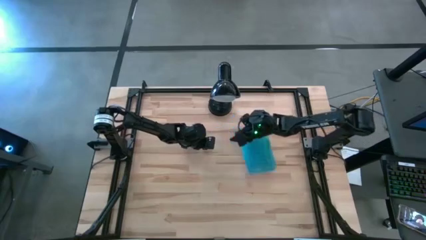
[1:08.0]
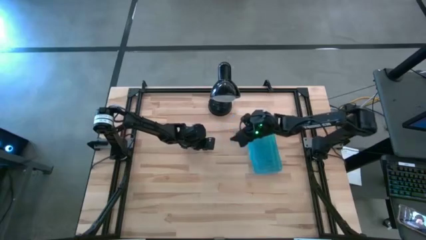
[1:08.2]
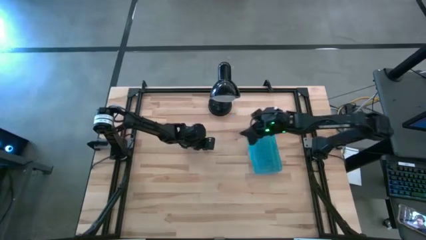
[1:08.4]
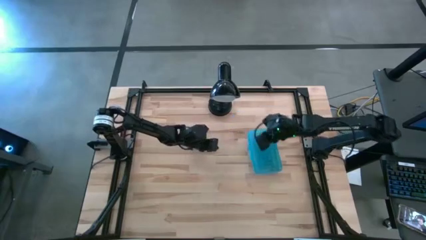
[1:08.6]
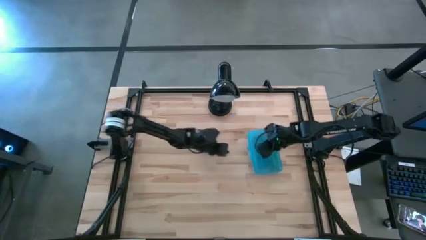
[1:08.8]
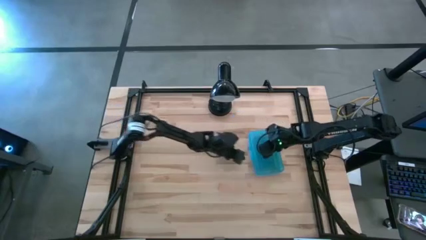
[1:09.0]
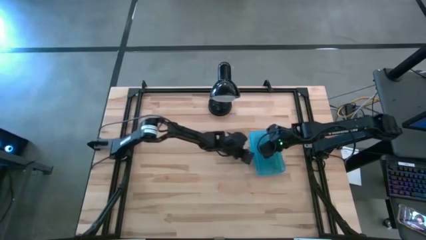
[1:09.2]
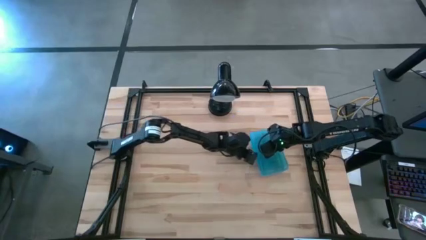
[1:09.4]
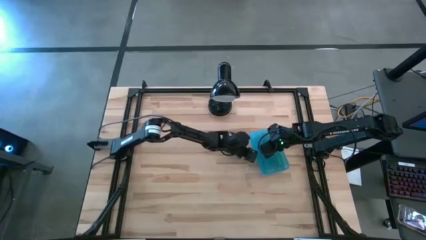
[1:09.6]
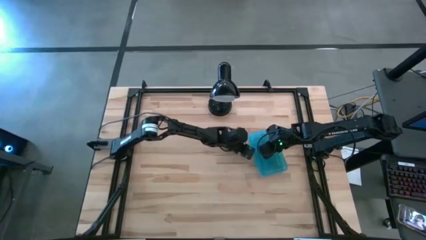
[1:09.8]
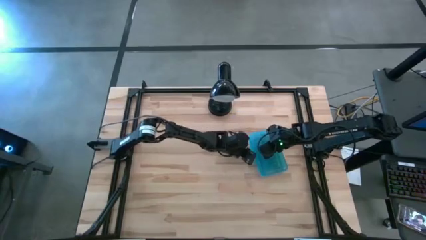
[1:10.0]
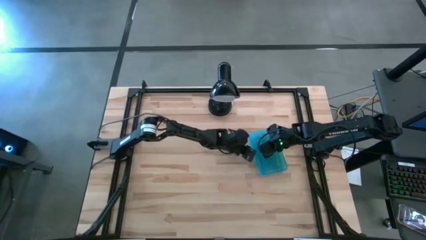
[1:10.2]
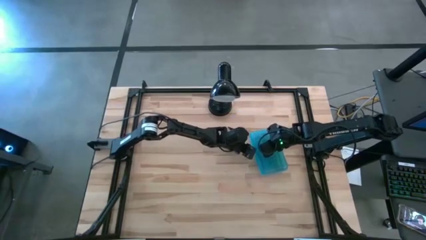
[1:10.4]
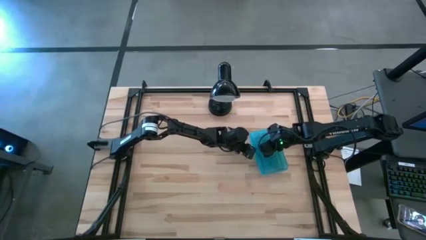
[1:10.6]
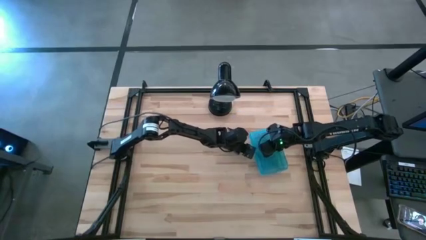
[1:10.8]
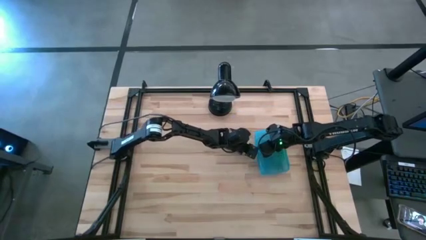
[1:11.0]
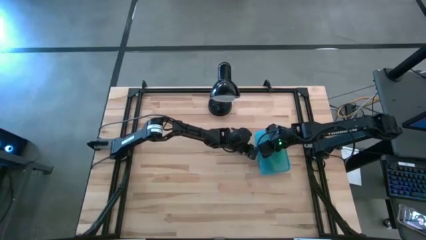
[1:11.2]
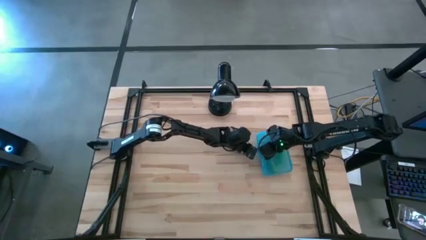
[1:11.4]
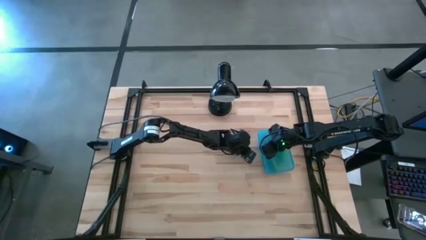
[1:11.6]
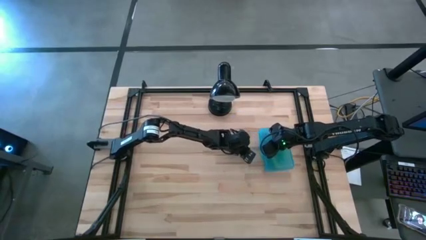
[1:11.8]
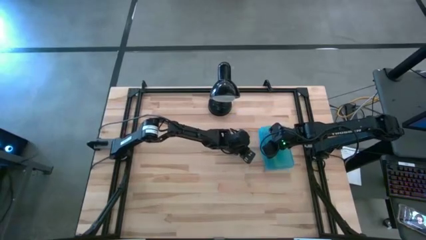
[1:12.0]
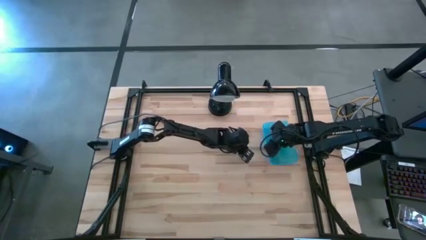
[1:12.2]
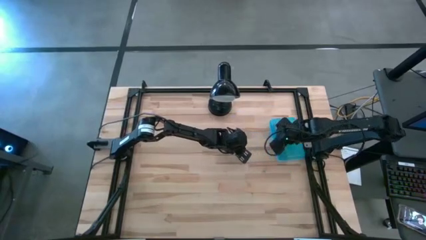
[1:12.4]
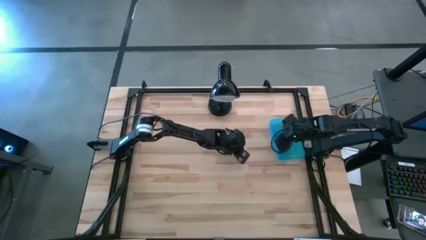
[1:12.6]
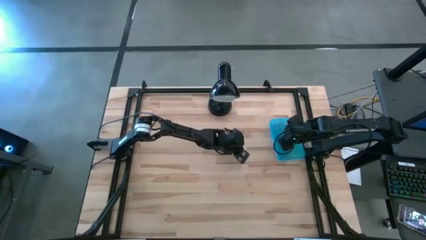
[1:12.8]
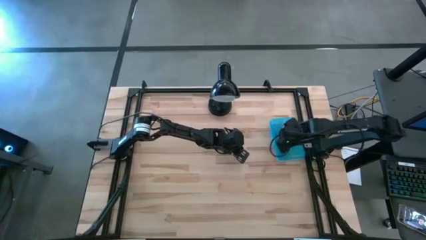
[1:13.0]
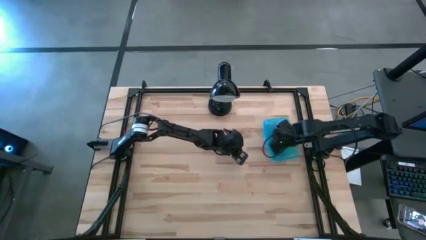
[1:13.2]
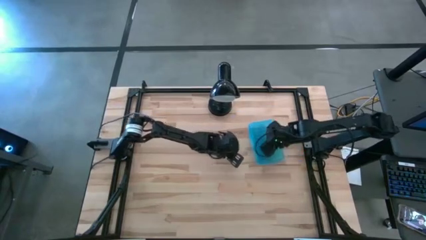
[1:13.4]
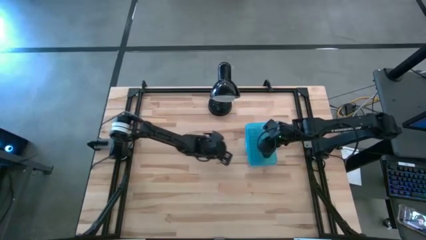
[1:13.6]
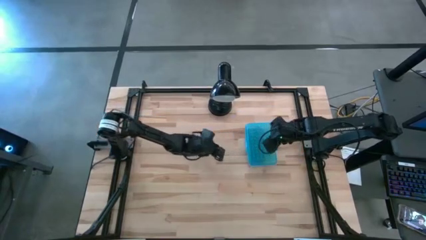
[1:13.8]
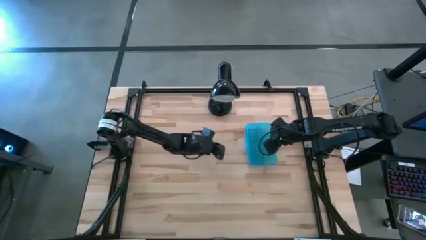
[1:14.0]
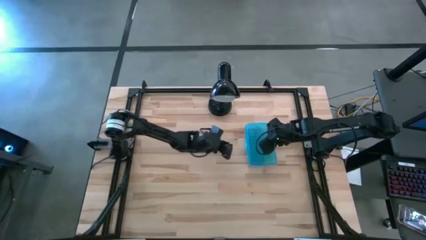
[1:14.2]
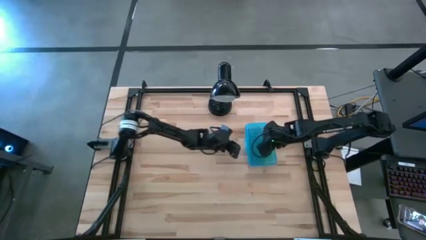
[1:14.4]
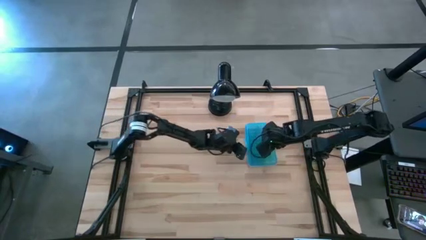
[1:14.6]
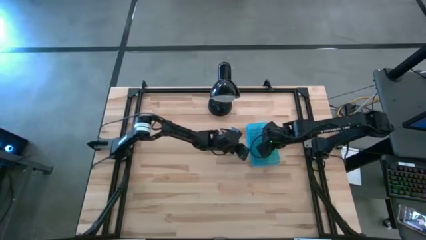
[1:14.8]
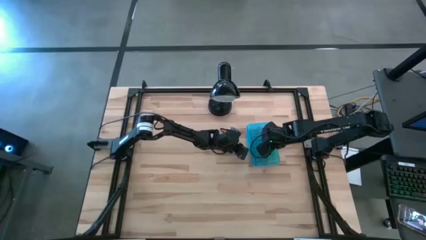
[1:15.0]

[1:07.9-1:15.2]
Task: Pick & place school supplies into a supply box
Adjust the supply box

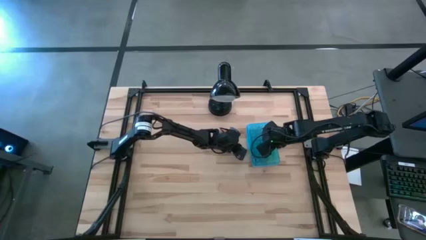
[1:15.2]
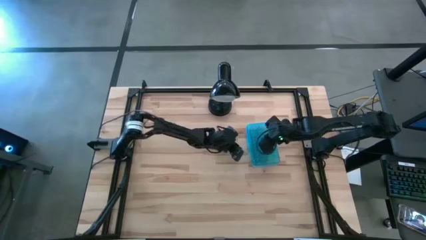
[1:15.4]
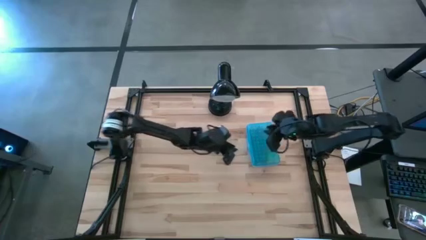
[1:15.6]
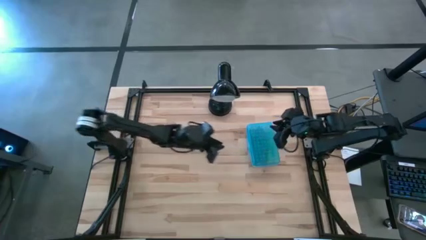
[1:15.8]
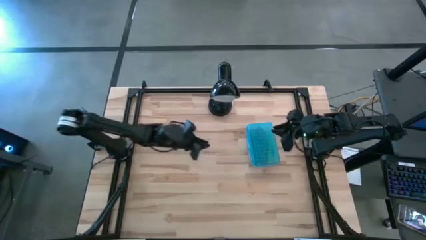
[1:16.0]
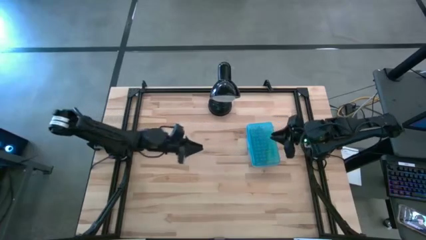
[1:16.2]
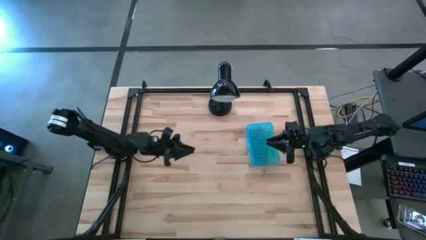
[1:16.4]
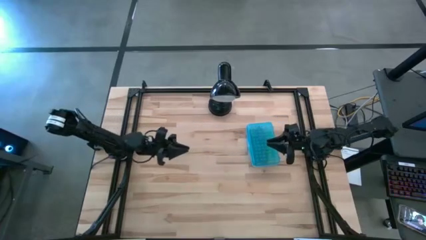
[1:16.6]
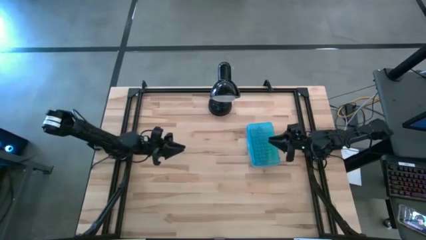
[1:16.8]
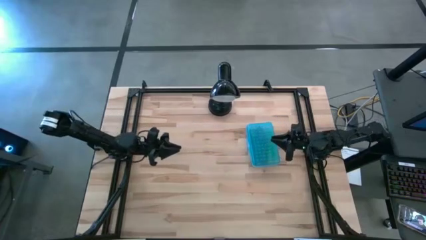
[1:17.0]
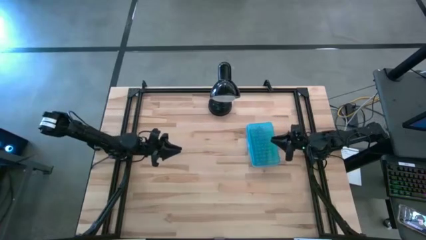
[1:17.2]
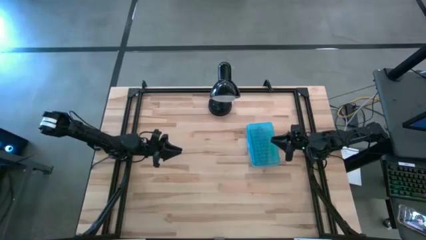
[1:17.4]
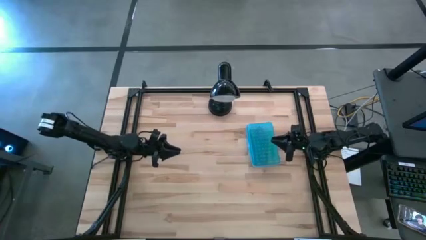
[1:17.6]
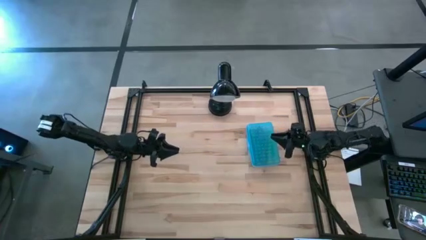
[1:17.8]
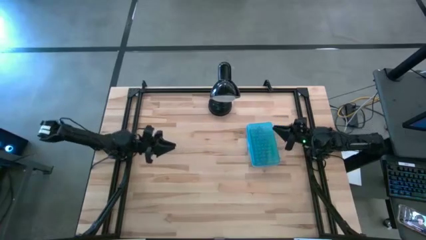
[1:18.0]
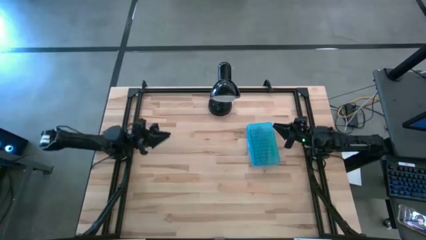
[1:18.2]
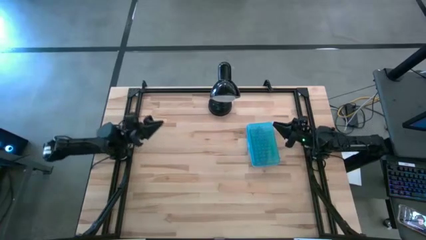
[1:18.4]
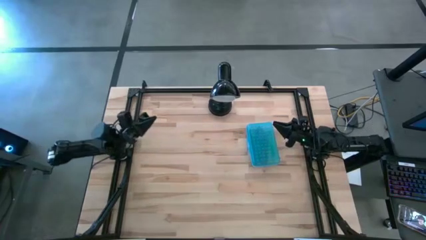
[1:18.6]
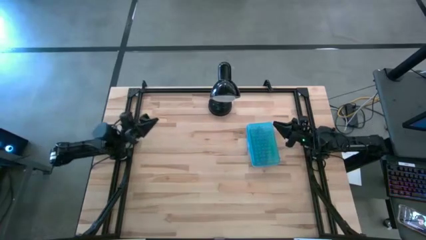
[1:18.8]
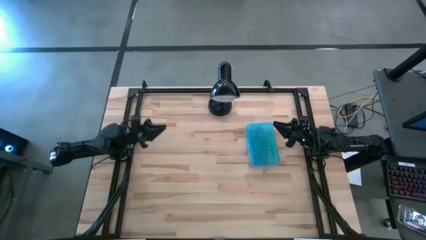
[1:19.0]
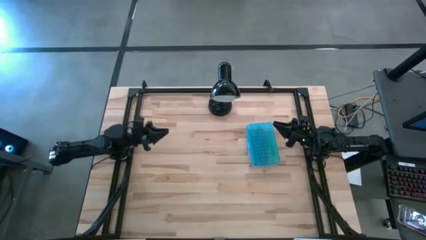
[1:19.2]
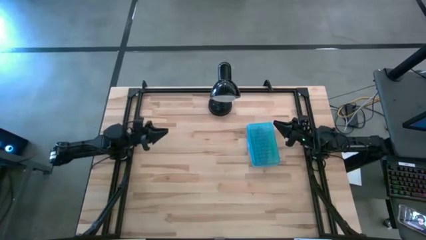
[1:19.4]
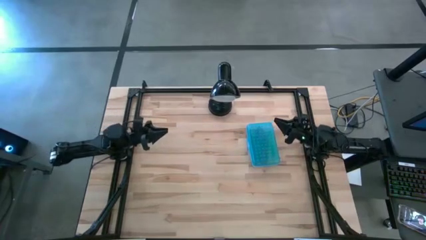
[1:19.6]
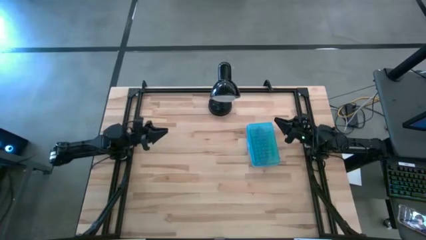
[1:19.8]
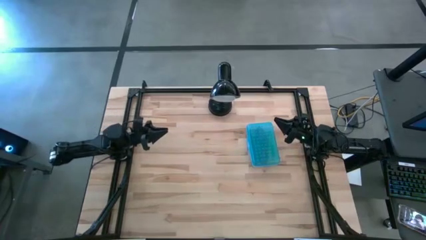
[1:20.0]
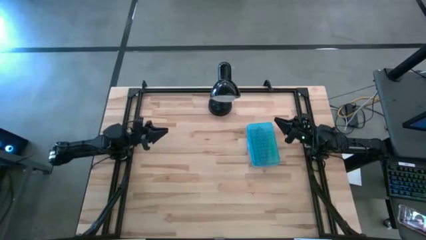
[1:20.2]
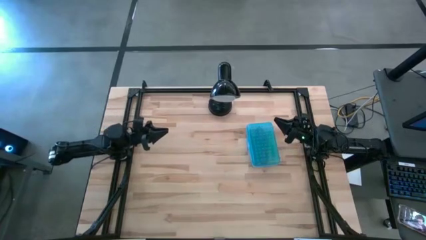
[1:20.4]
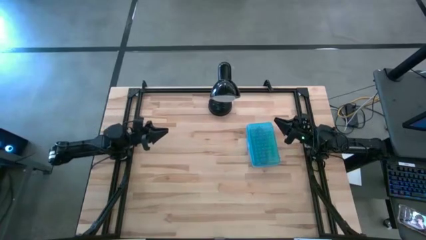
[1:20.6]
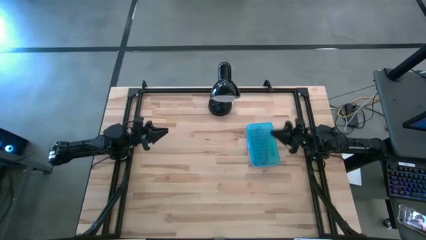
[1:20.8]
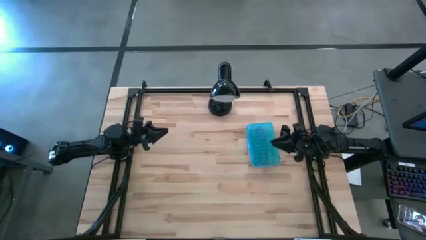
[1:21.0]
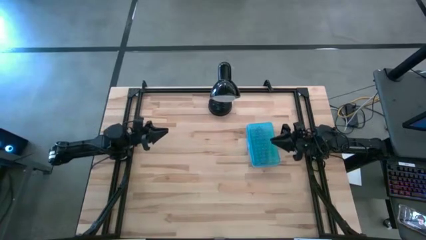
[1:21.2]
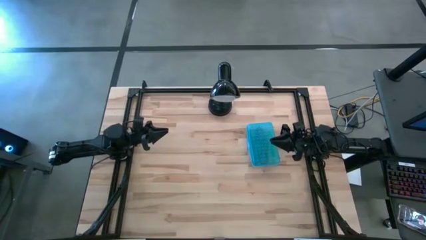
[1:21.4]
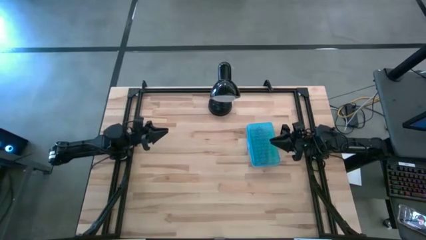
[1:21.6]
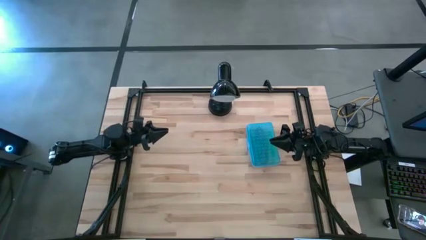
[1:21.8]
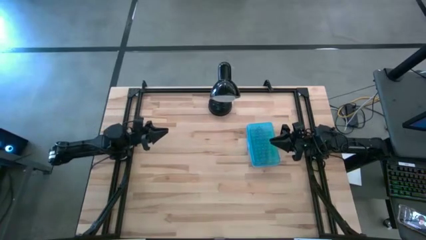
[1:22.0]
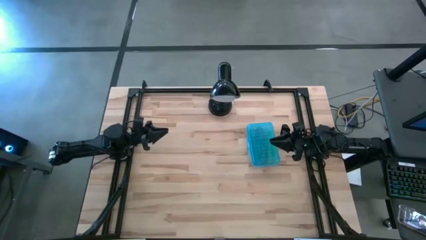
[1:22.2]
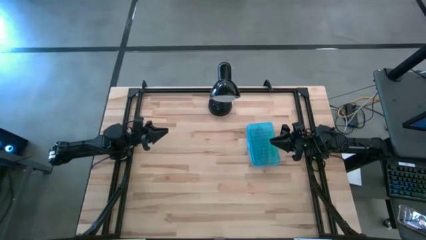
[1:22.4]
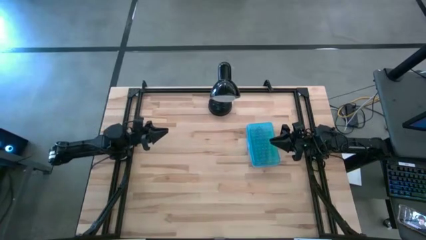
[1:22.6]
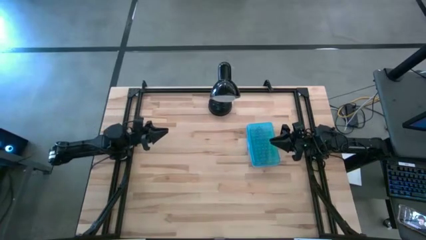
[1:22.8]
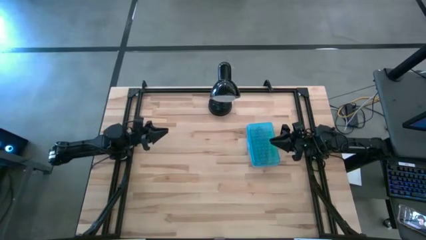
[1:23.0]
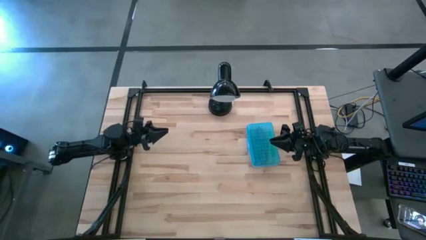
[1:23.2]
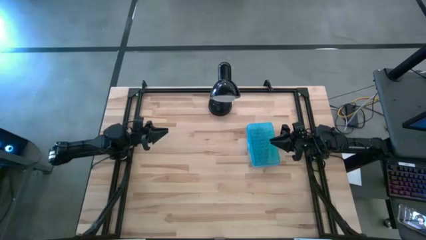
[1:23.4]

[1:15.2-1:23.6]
Return to Home Position

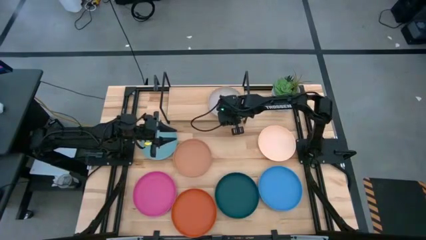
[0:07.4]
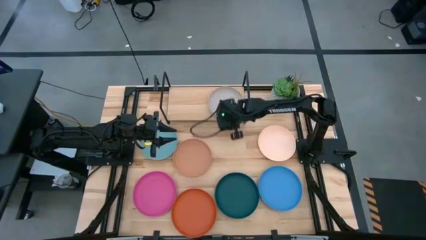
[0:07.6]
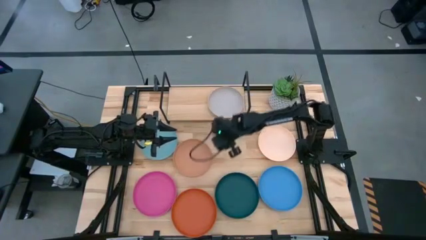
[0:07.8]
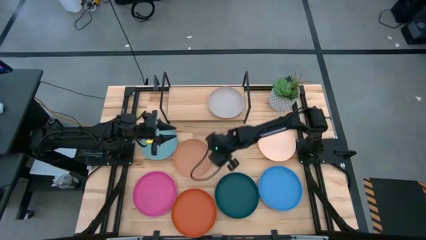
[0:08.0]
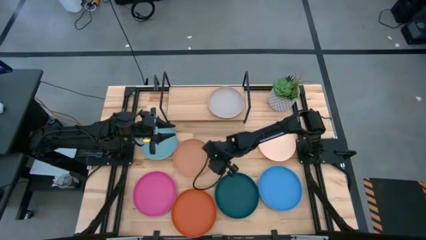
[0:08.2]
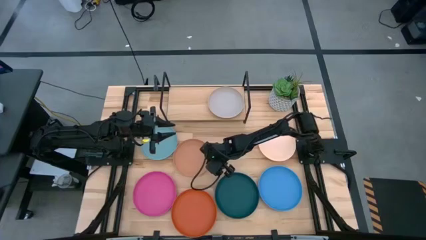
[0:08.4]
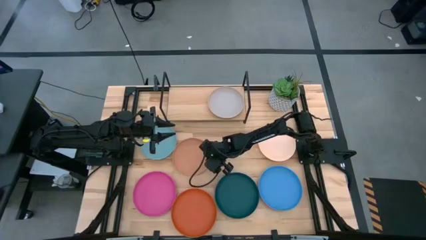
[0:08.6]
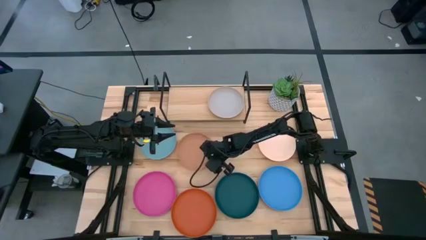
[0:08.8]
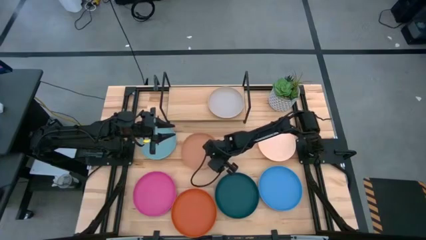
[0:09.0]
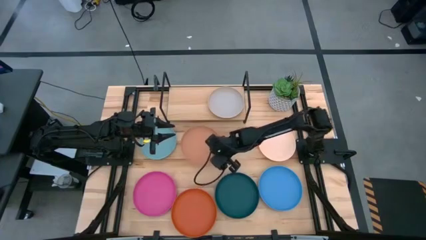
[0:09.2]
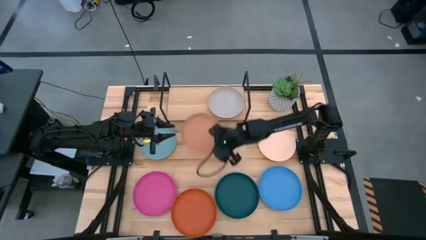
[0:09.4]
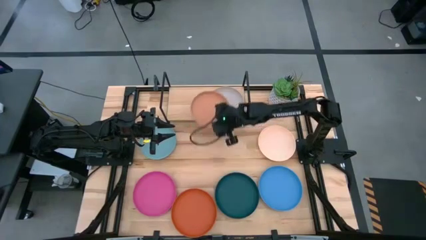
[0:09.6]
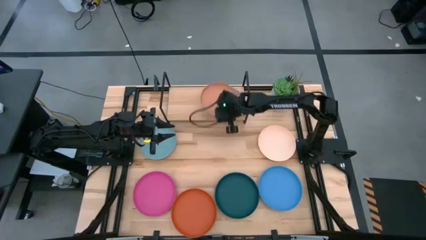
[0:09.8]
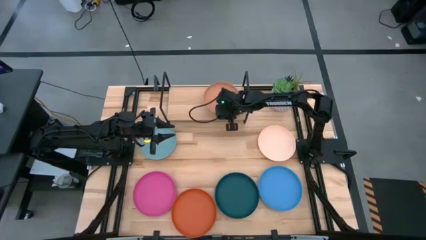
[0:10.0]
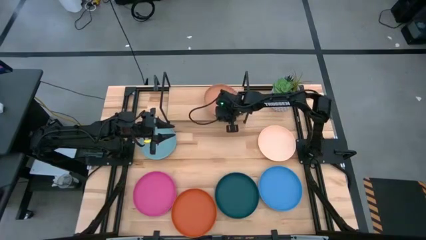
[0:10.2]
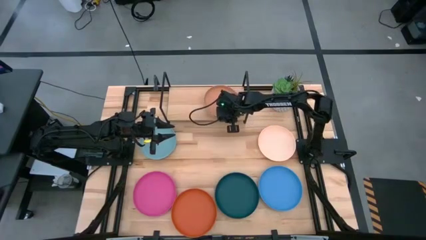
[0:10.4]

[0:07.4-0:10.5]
Task: Place and stack plates onto a shelf
Stack the light orange plate on top of the gray plate on the shelf
